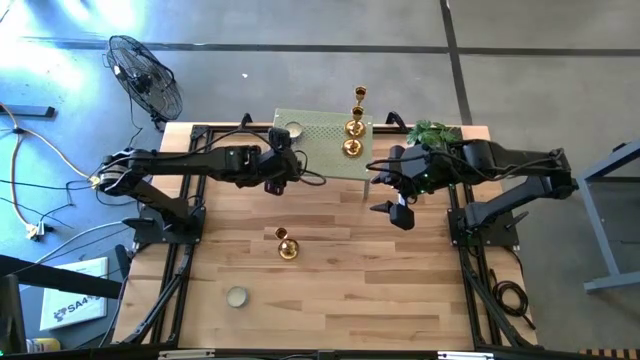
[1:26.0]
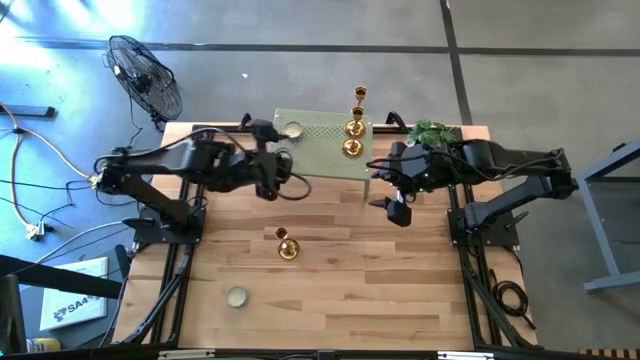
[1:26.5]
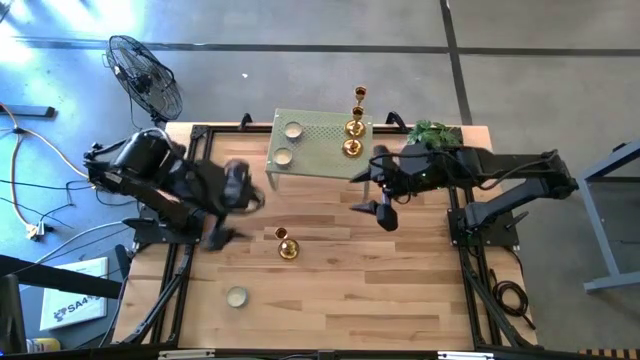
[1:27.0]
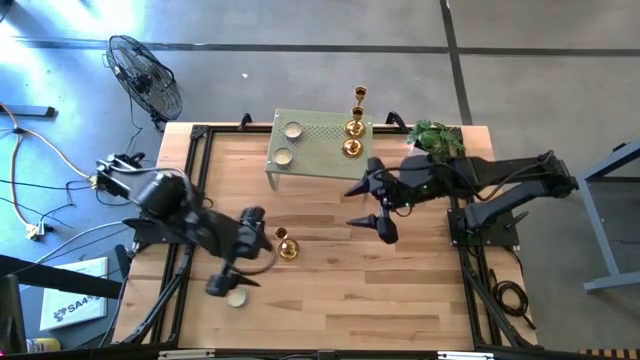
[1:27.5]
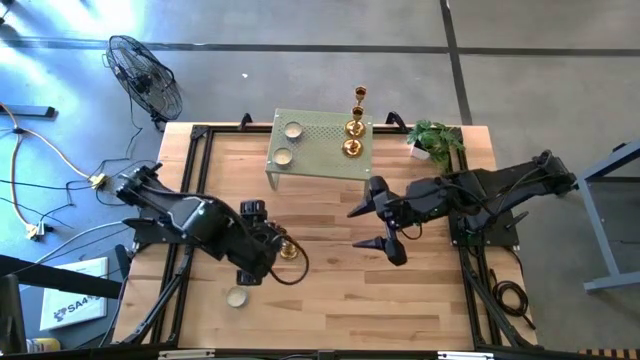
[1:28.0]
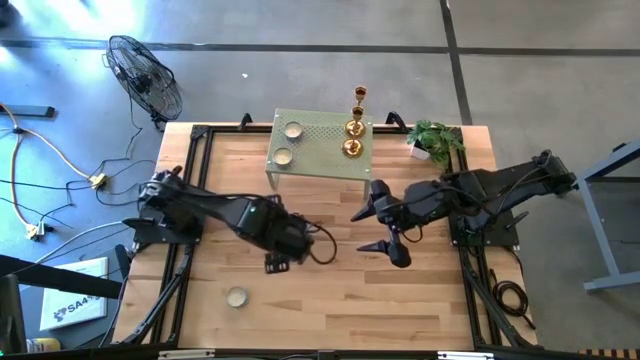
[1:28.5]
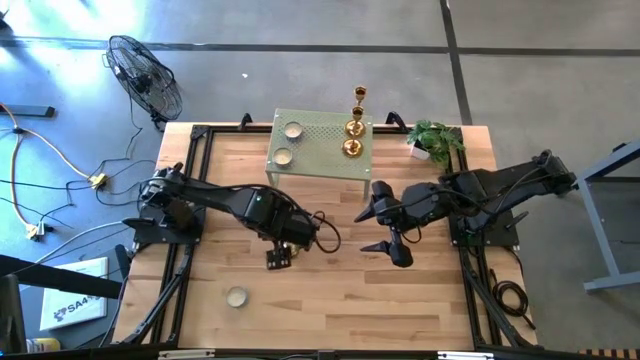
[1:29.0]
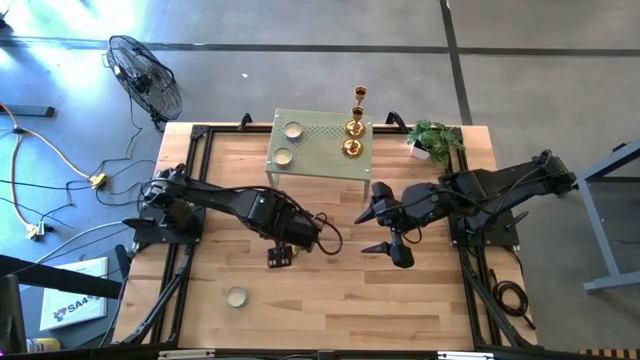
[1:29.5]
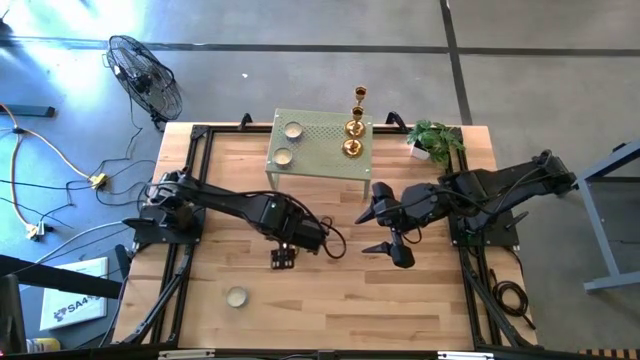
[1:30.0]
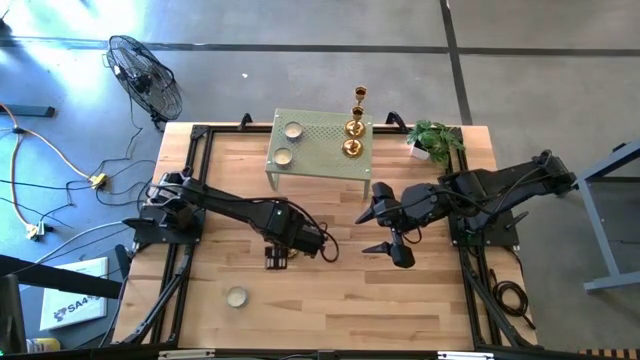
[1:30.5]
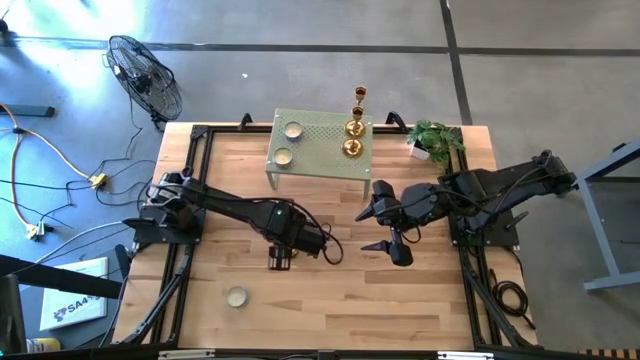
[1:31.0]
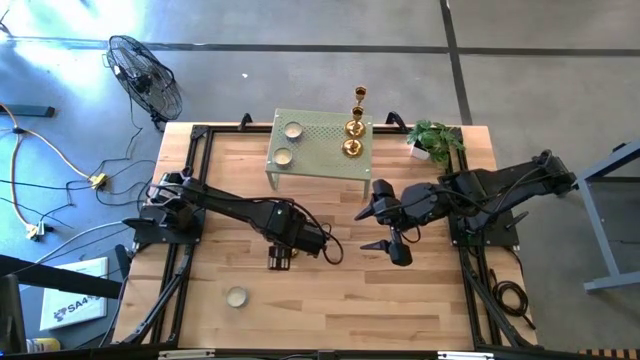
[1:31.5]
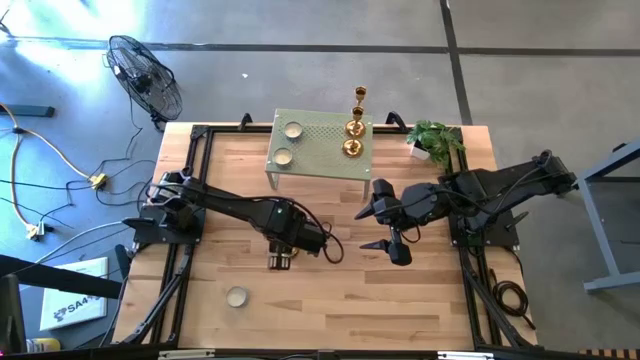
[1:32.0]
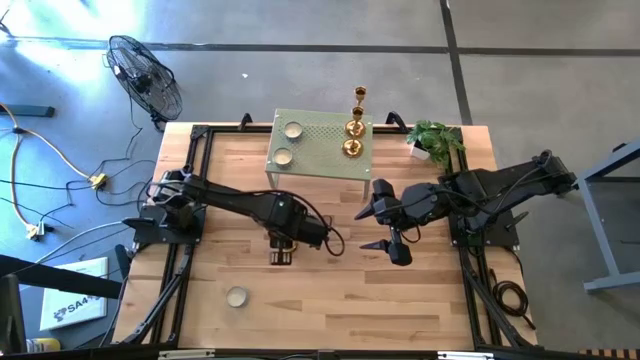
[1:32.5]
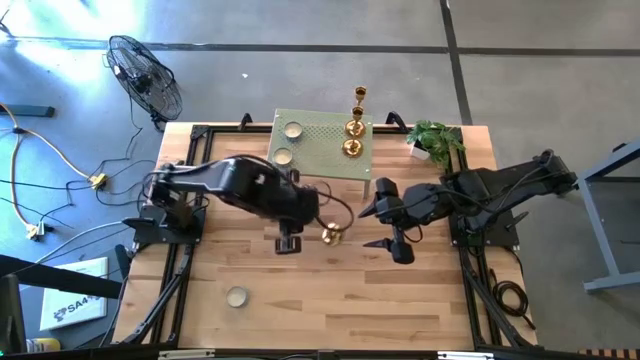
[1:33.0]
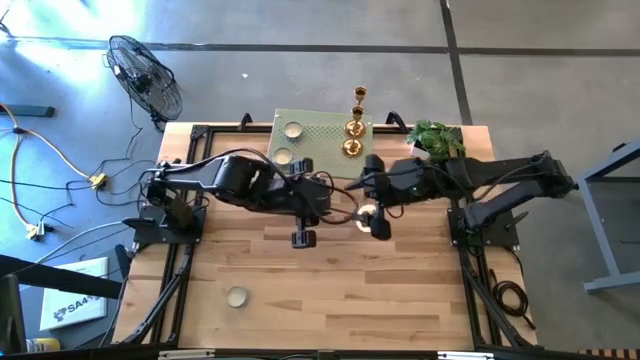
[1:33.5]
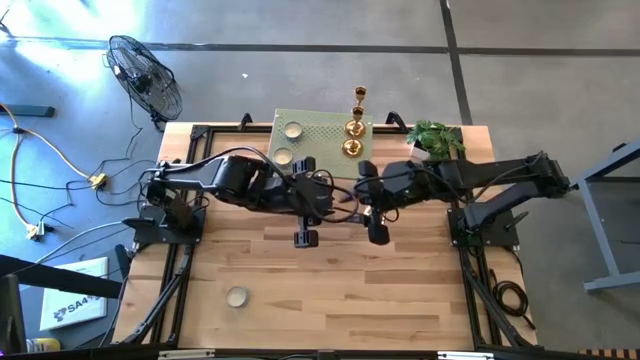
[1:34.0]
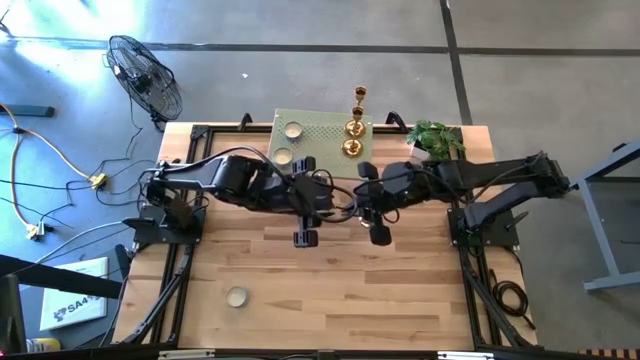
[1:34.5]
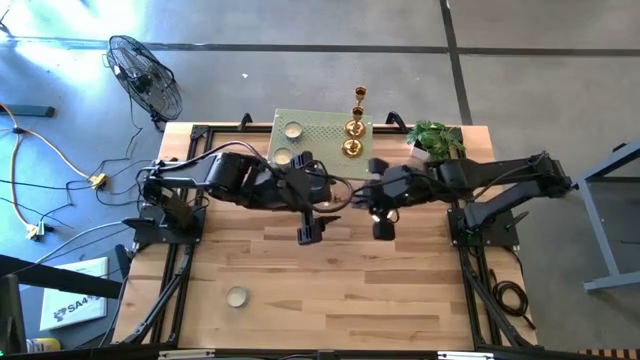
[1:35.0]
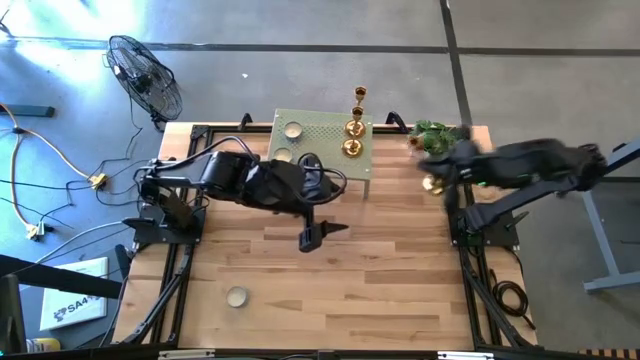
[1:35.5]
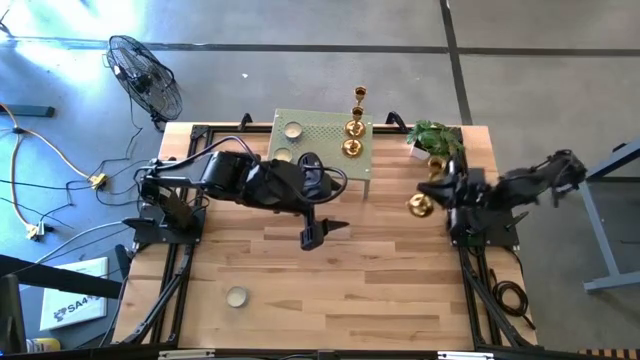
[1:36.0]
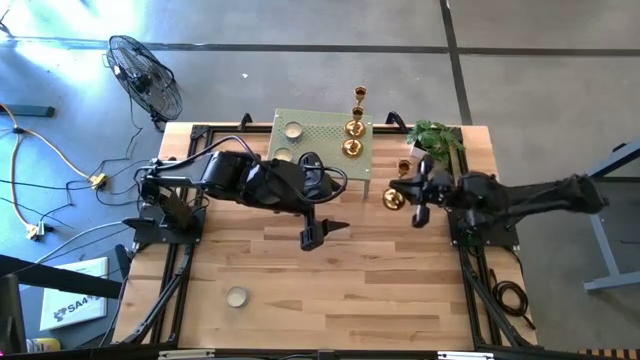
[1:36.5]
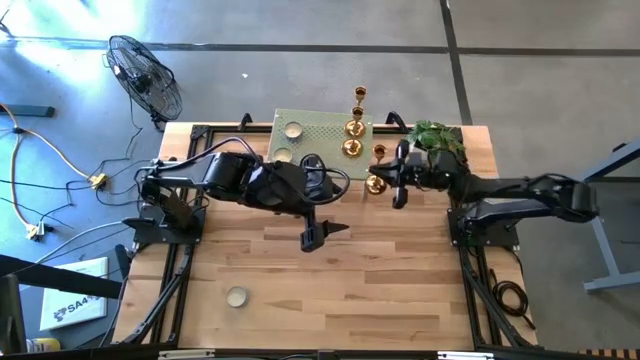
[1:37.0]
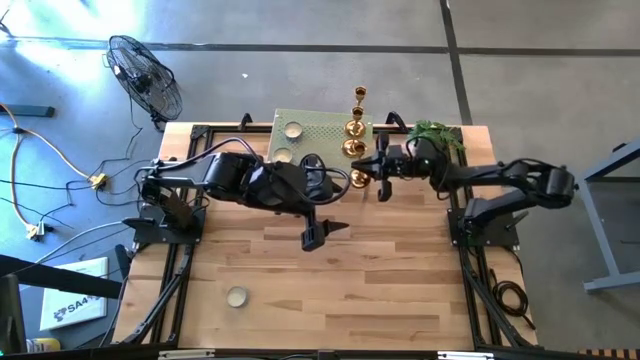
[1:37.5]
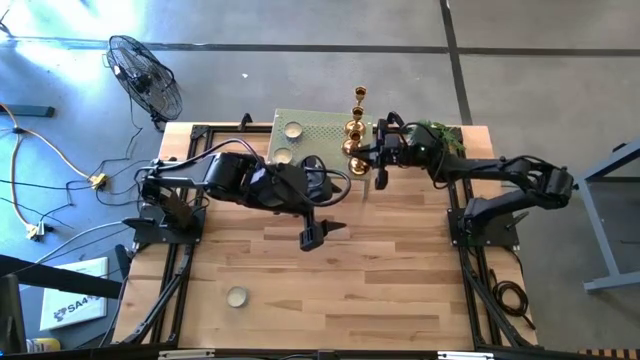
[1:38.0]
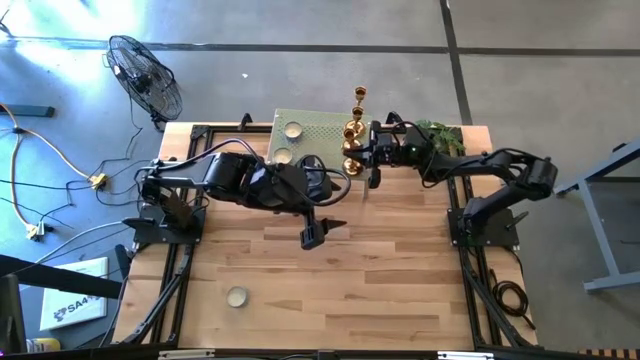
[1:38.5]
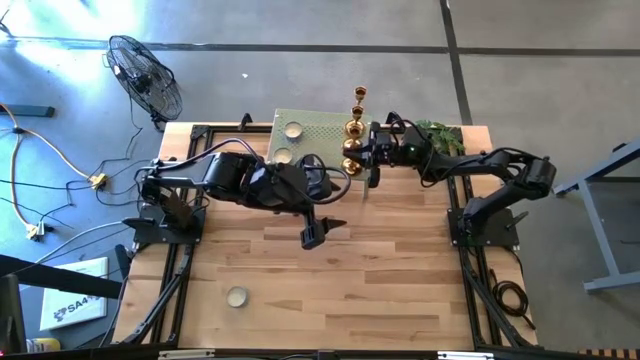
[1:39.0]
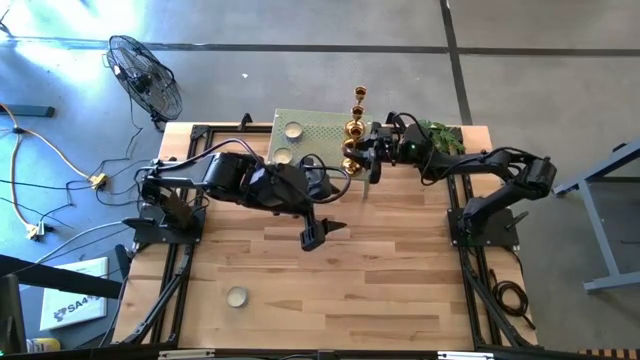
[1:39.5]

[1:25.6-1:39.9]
Task: Stock candles and holders on shelf
Align the gold candle holder with the other gold candle holders on the shelf

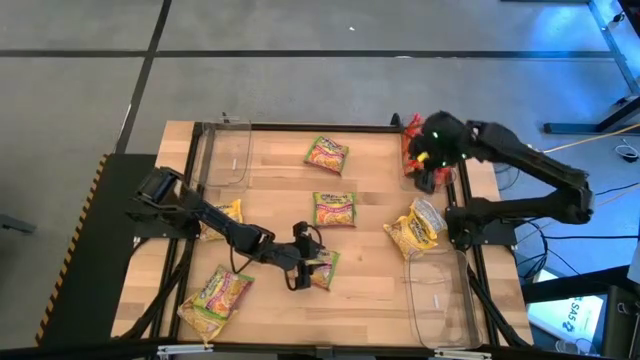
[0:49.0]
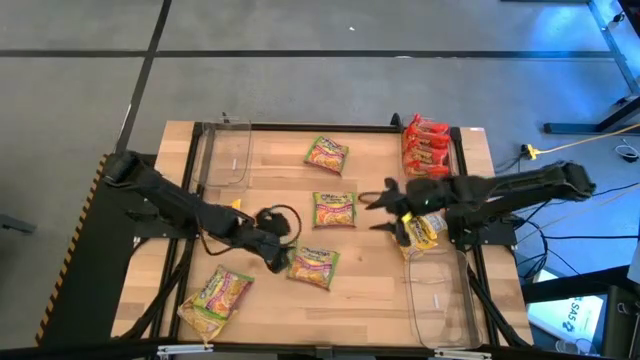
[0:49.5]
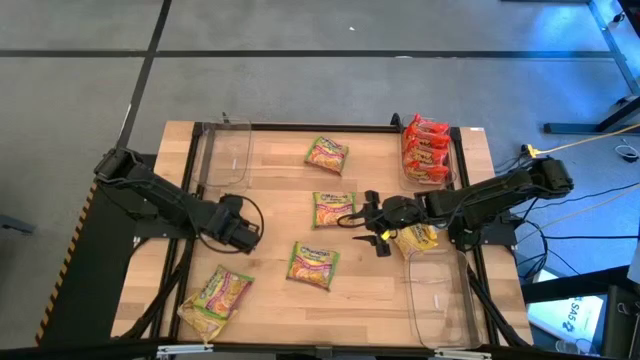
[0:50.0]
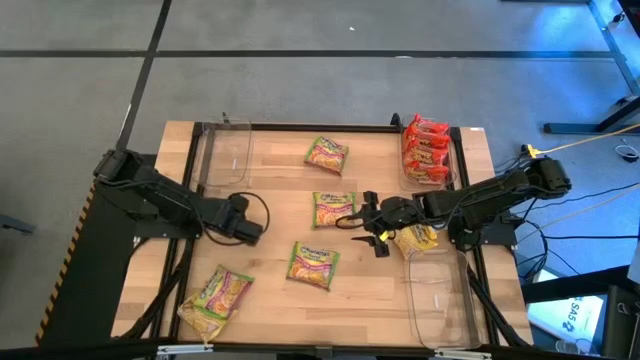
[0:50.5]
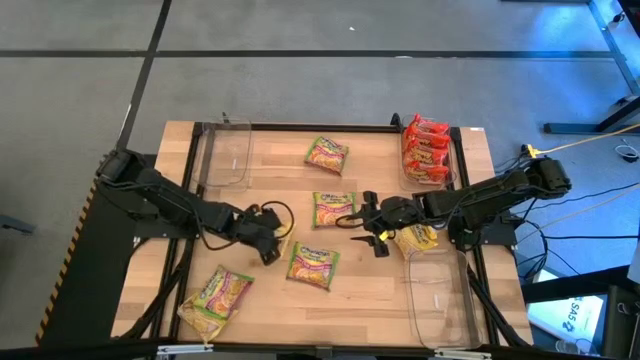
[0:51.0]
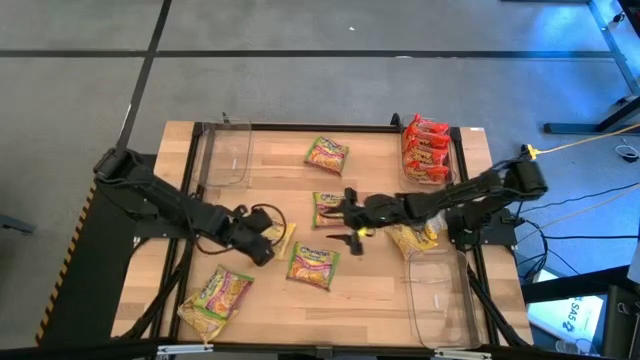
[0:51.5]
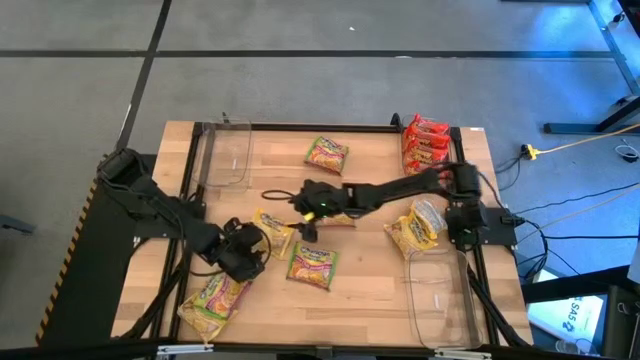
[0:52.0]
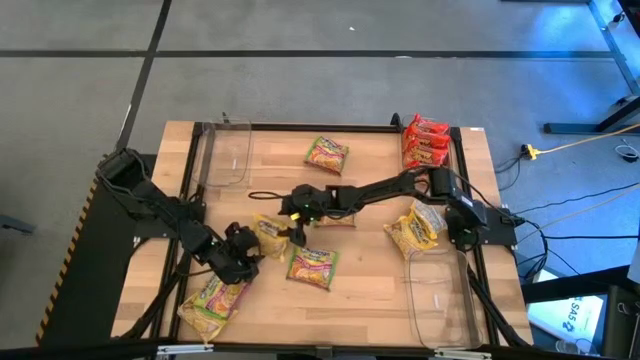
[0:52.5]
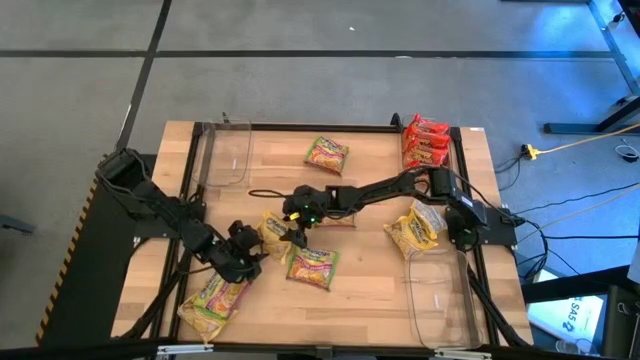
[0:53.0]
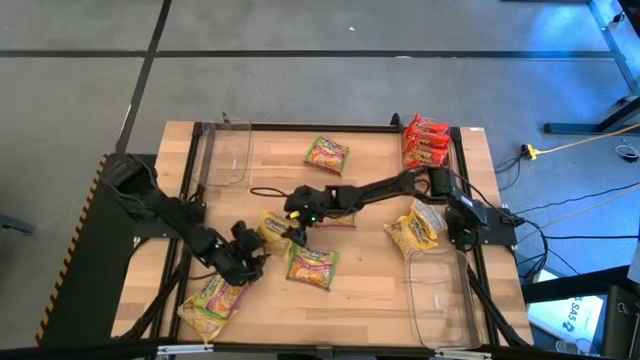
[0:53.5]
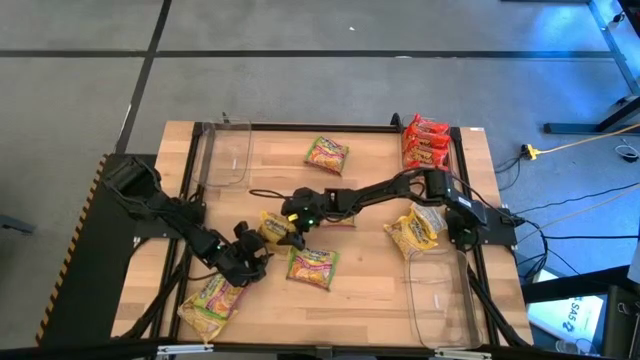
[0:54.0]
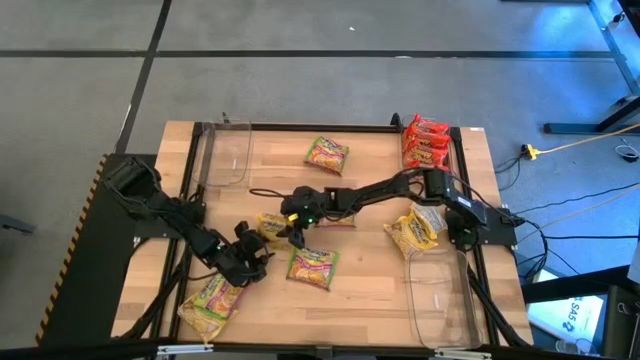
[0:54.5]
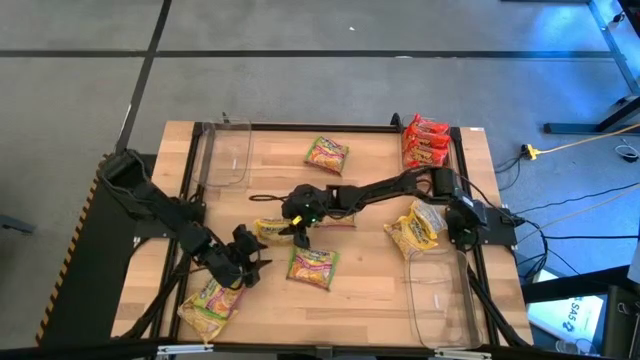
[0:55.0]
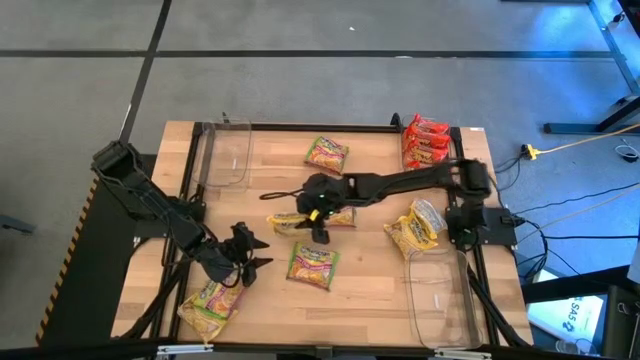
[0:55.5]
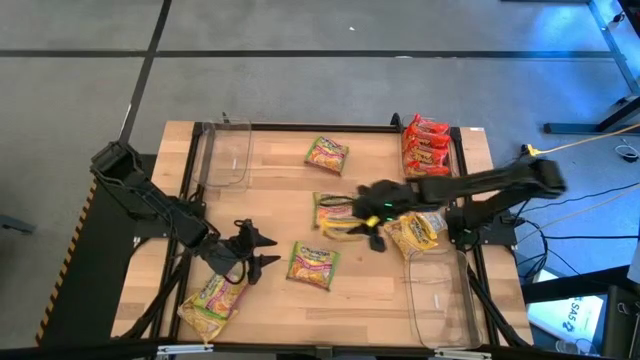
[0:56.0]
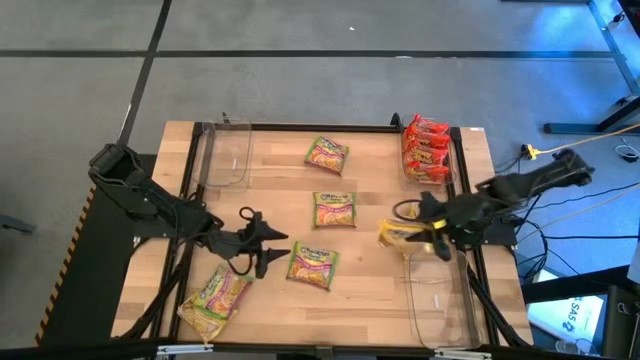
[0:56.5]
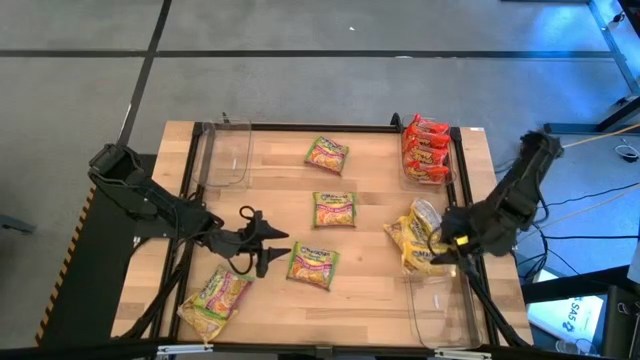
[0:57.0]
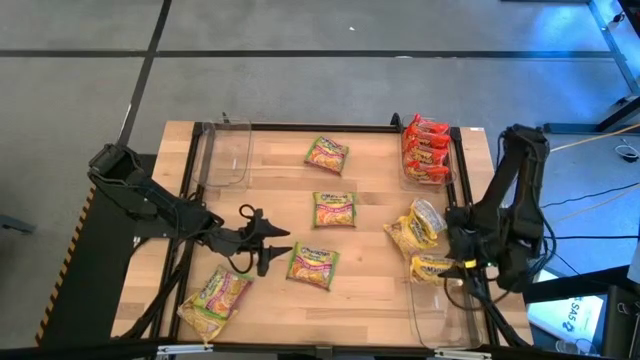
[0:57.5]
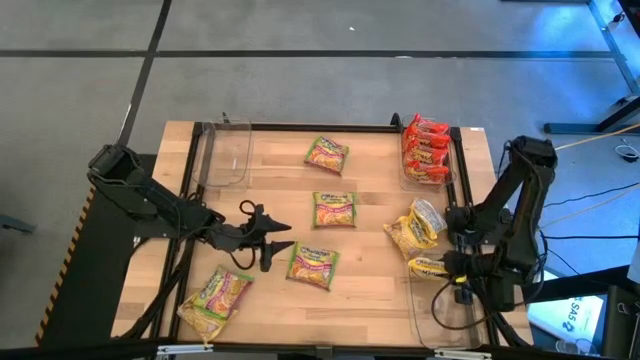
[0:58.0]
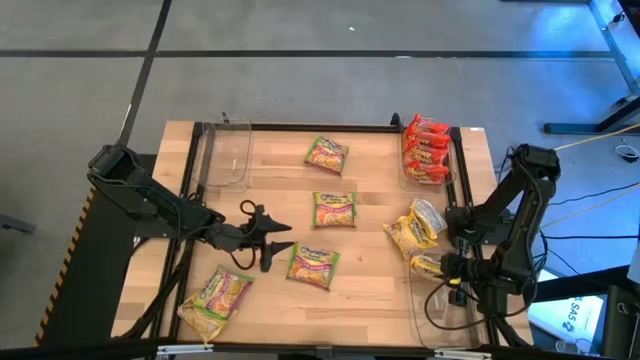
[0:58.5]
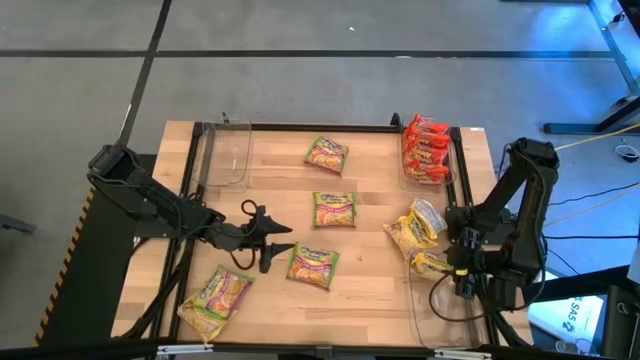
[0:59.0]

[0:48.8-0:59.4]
Task: Sort Maruchan noodles
Put the yellow noodle pack into the bottom transparent bin
